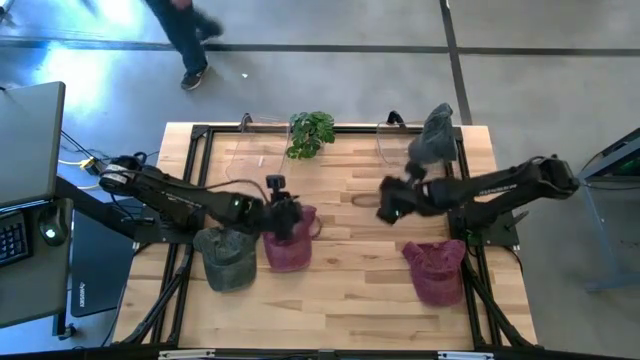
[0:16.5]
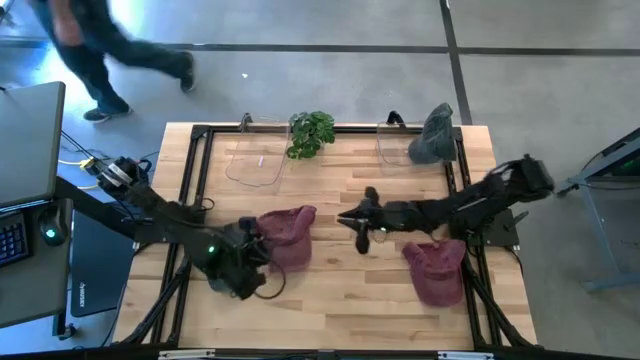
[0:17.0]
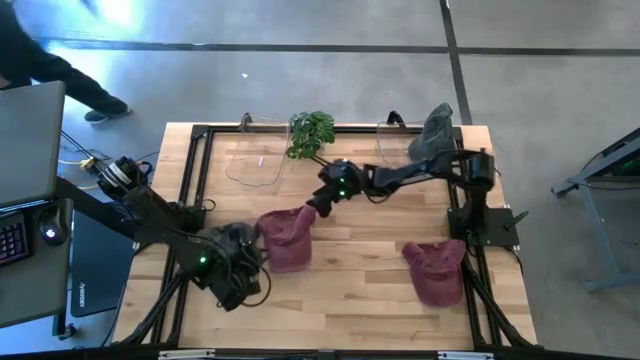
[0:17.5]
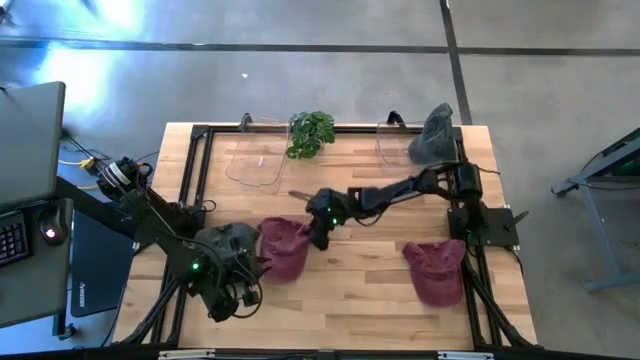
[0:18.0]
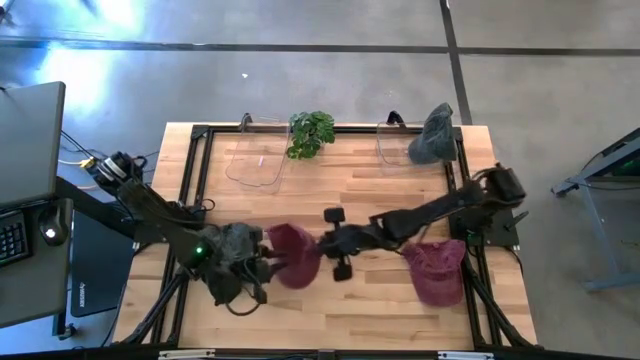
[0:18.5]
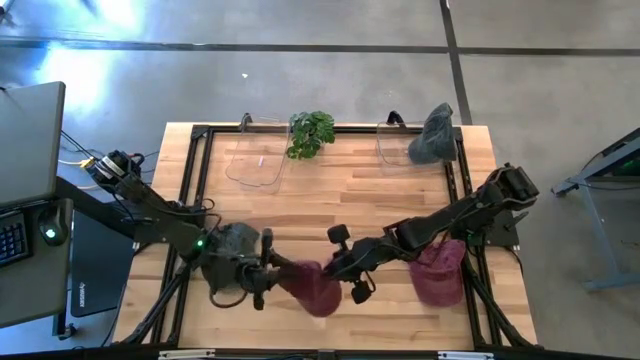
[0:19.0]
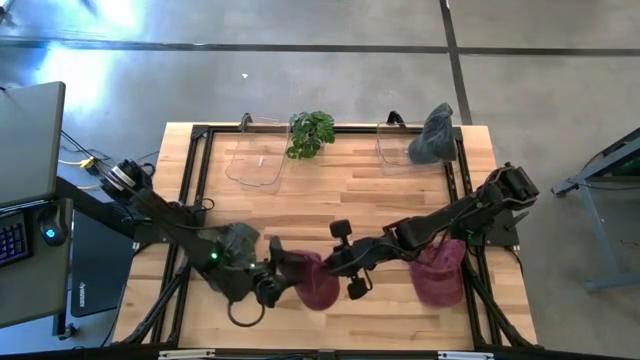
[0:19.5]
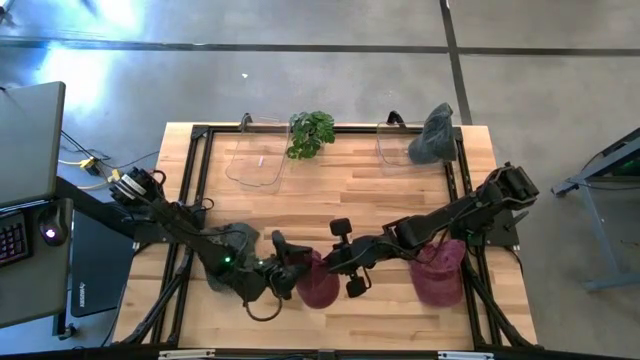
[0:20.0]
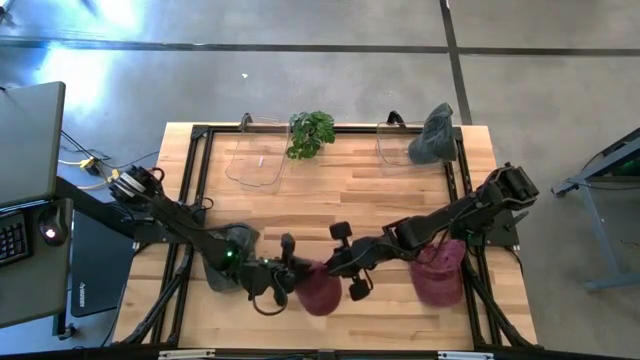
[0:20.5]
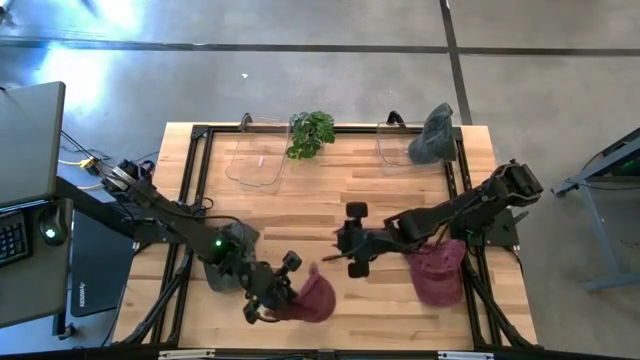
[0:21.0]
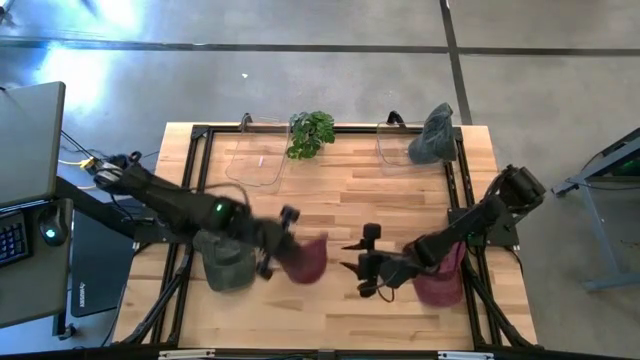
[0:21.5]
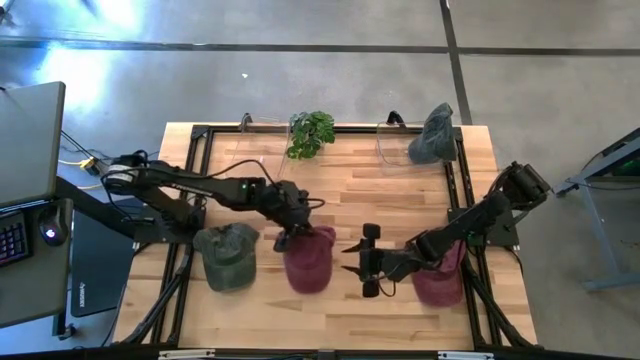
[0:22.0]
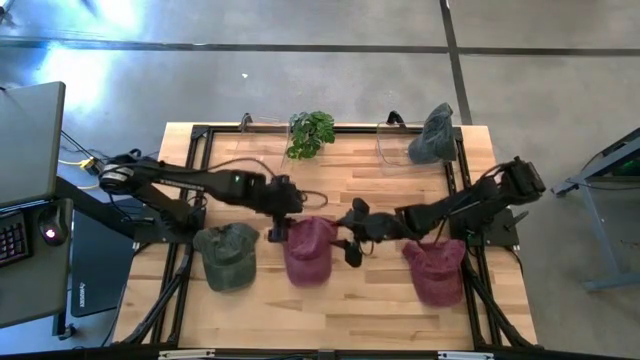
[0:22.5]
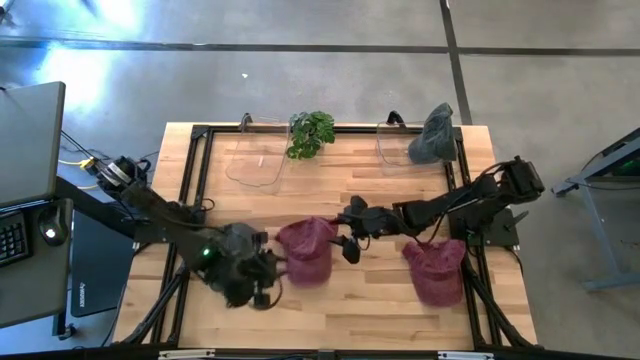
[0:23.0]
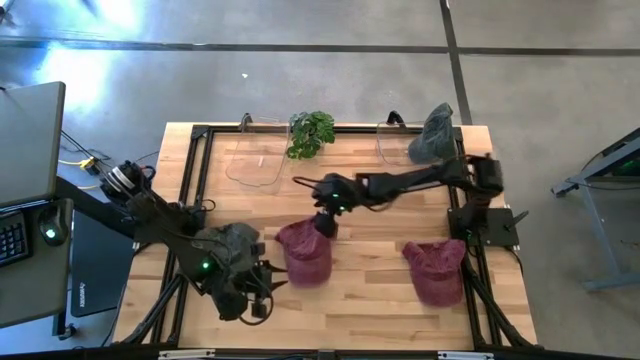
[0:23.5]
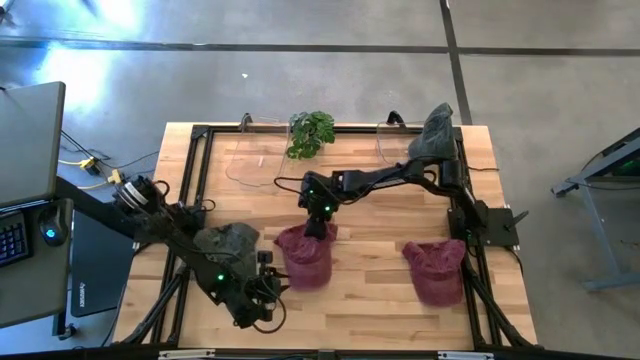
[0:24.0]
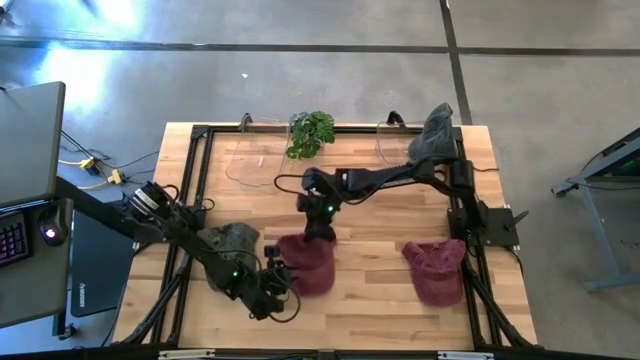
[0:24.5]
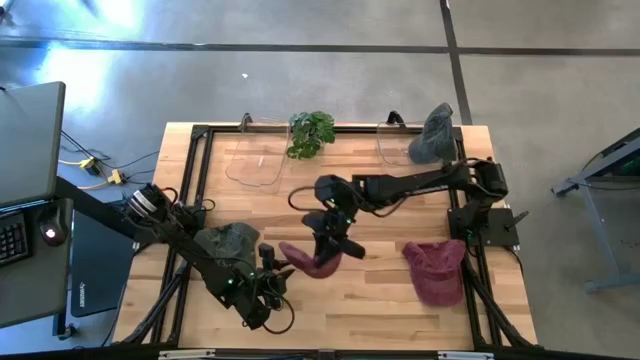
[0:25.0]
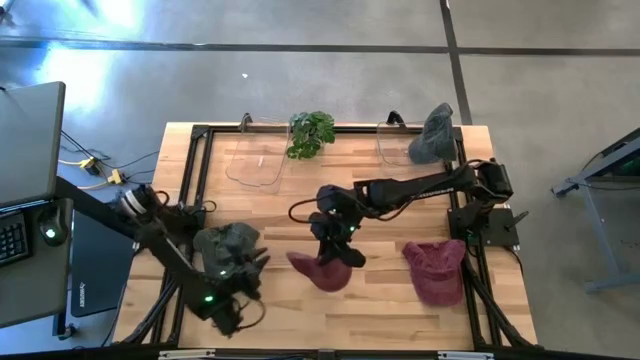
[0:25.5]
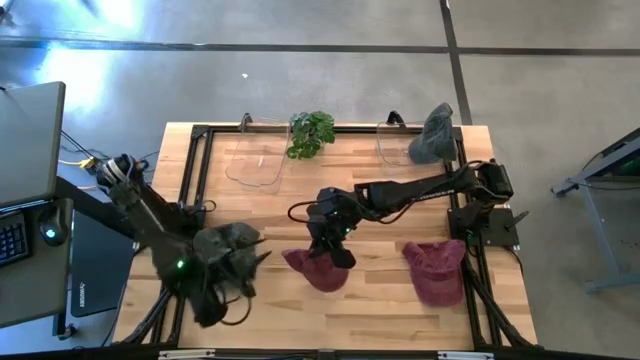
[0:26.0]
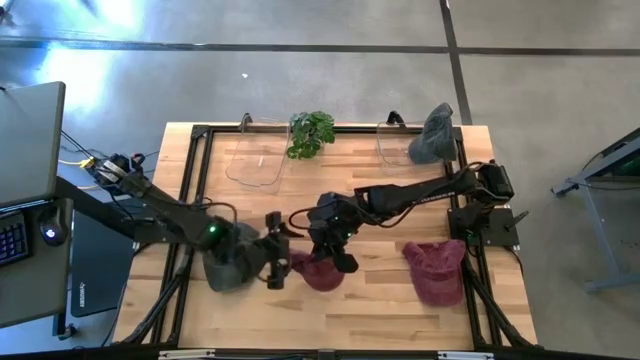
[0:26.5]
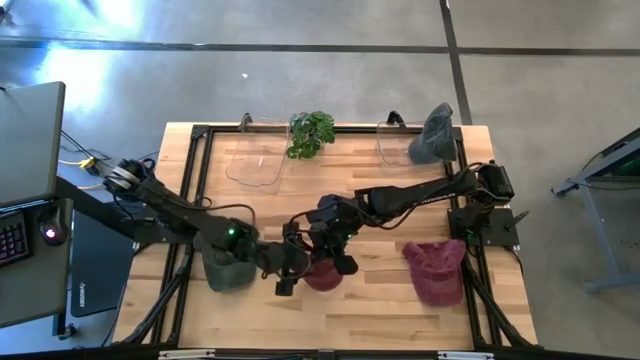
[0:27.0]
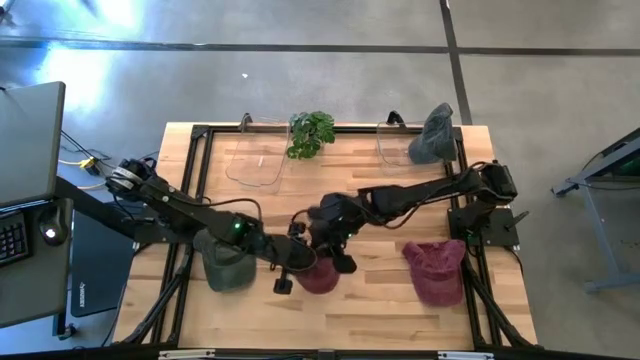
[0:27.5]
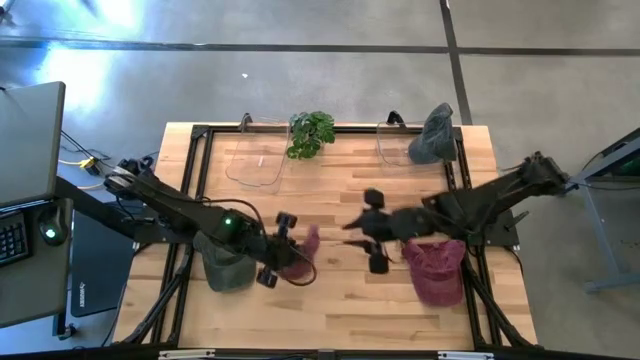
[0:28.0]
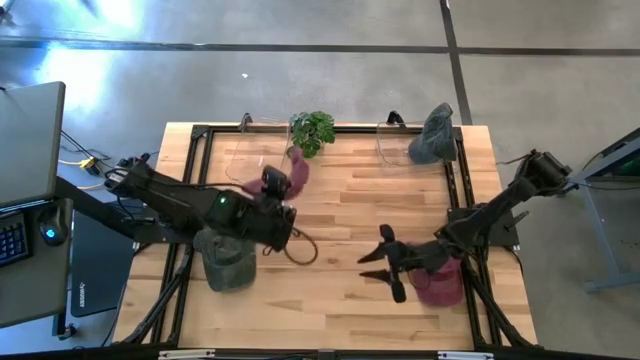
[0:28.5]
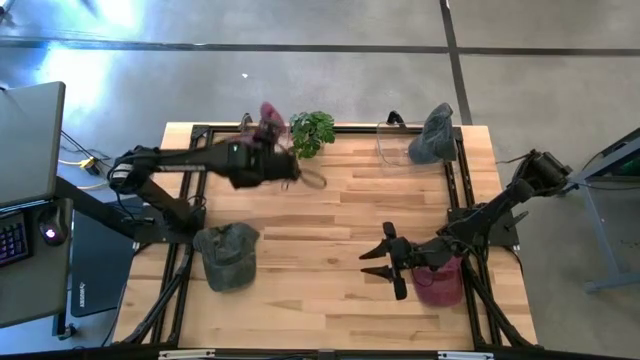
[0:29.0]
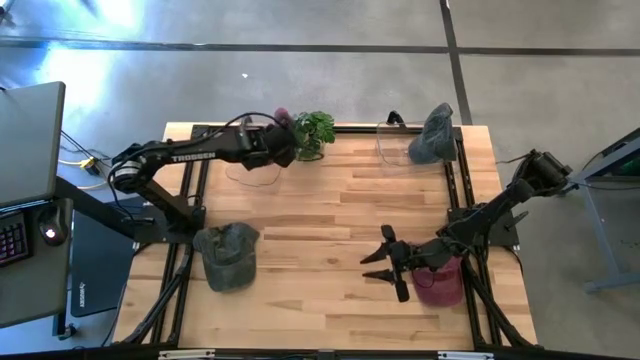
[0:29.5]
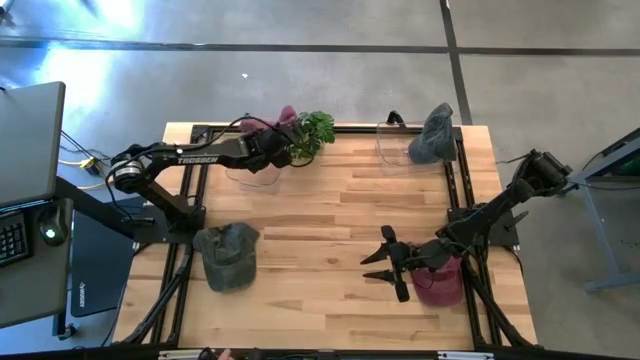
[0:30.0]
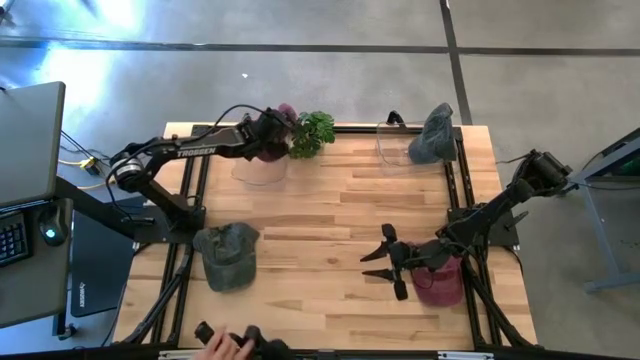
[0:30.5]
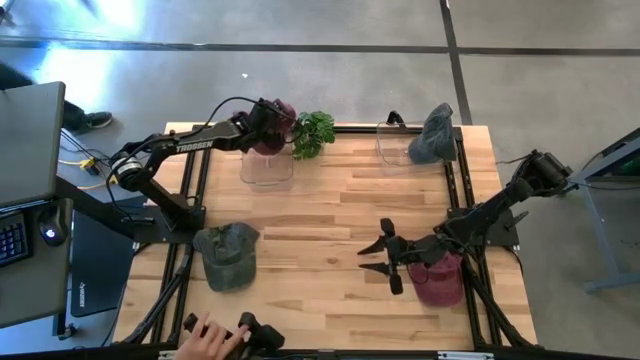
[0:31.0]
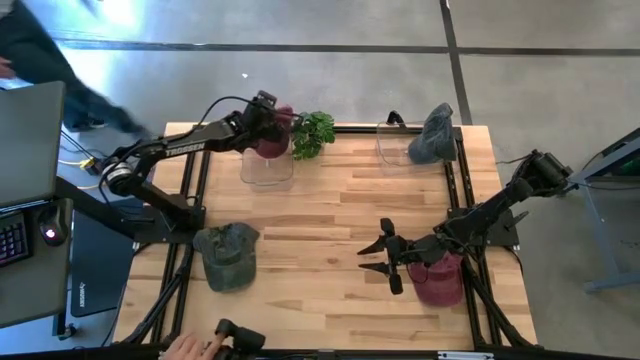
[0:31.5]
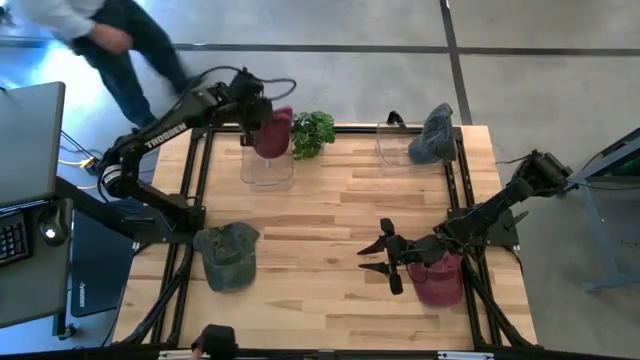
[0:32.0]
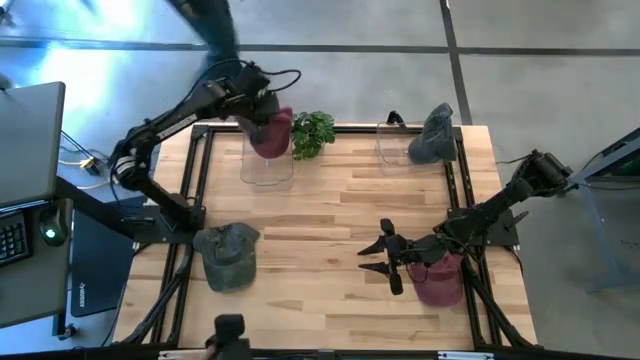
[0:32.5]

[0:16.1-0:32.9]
Task: Pick & Place hat
Put the left red cap into the left transparent bin

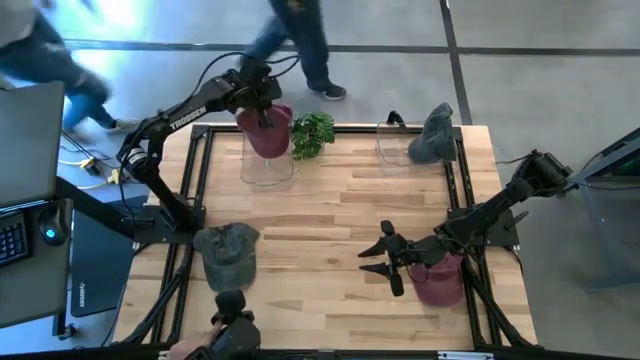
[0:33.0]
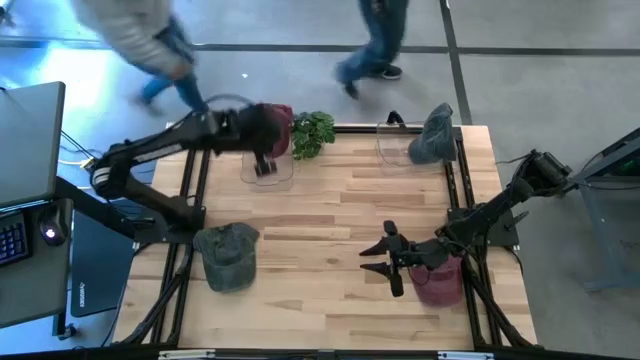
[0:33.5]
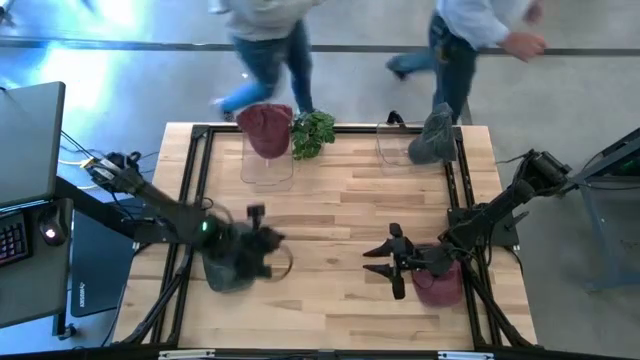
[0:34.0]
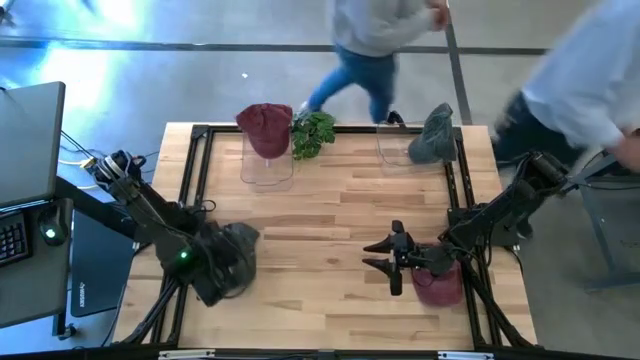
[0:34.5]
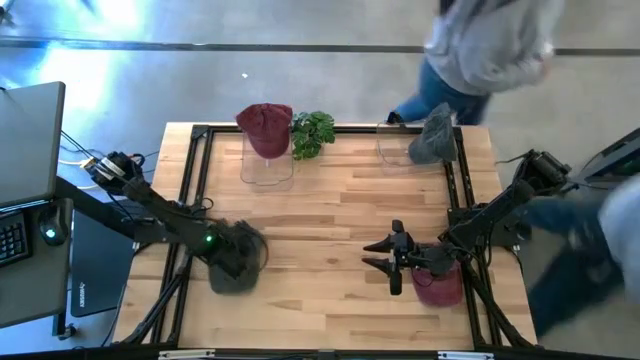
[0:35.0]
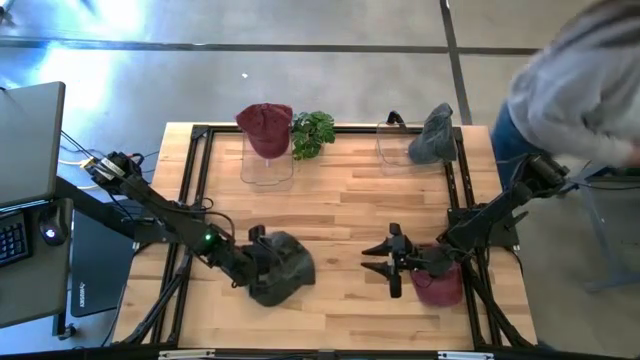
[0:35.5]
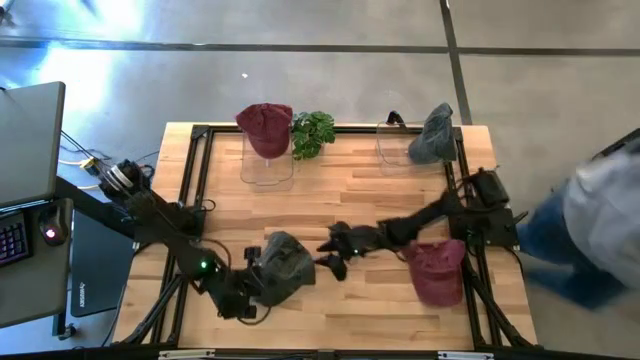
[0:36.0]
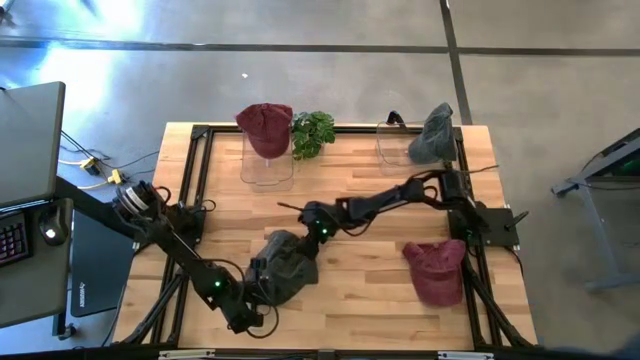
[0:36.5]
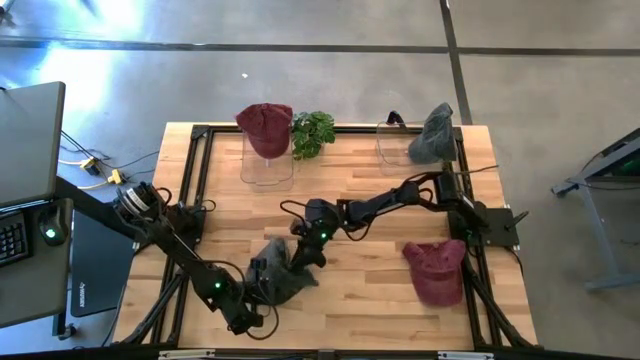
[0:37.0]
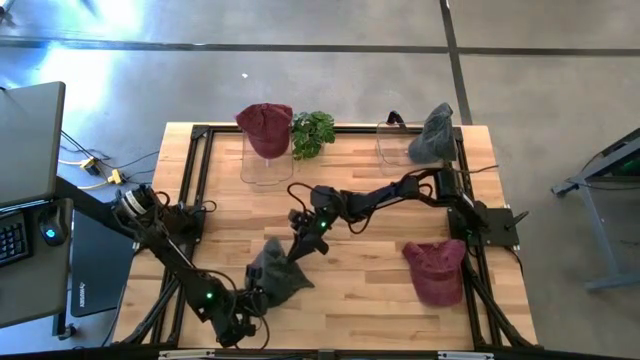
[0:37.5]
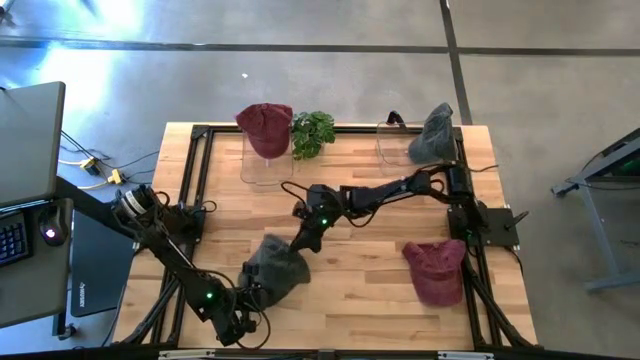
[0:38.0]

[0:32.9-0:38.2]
Put the black cap into the right transparent bin
